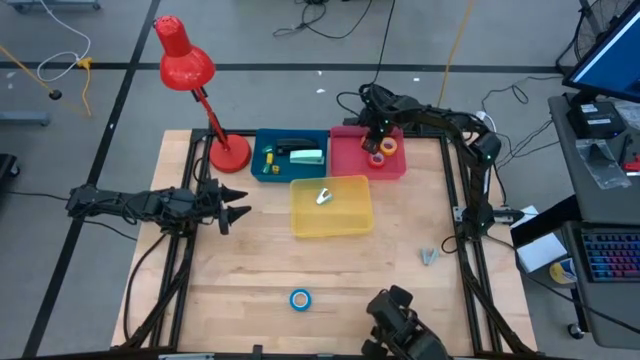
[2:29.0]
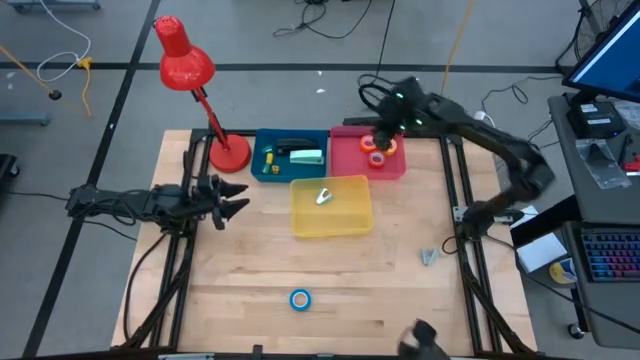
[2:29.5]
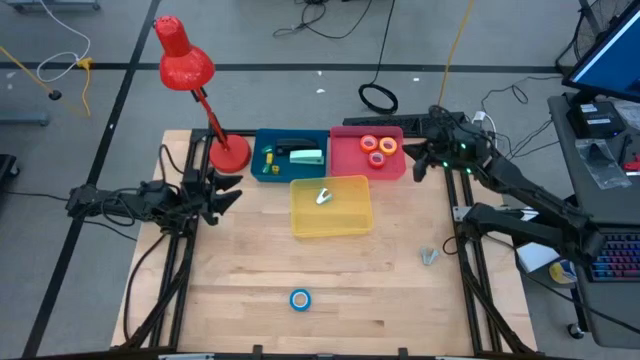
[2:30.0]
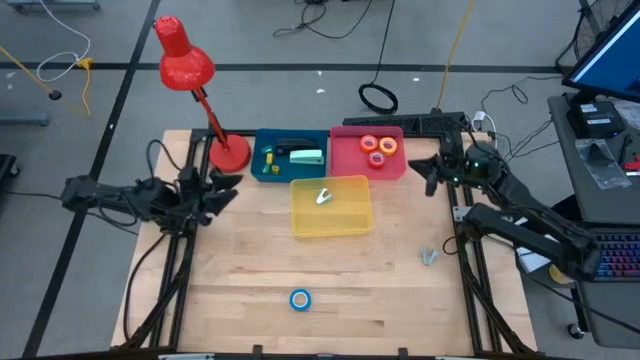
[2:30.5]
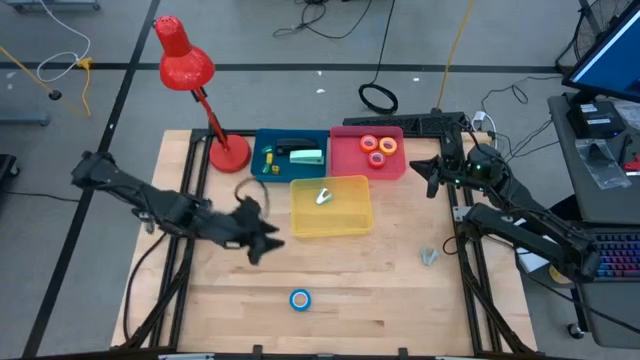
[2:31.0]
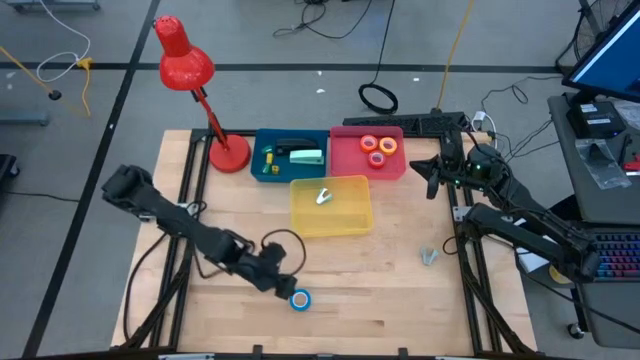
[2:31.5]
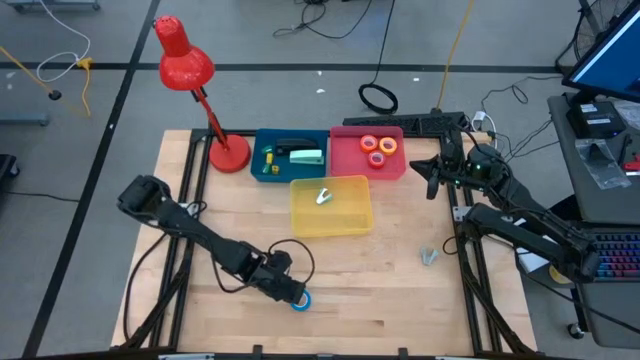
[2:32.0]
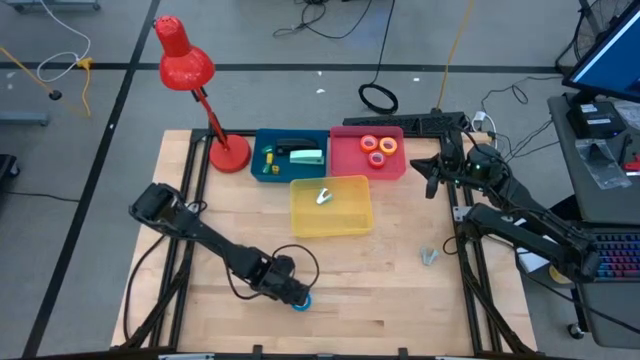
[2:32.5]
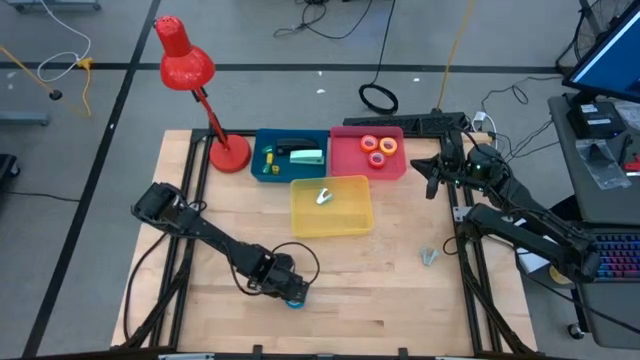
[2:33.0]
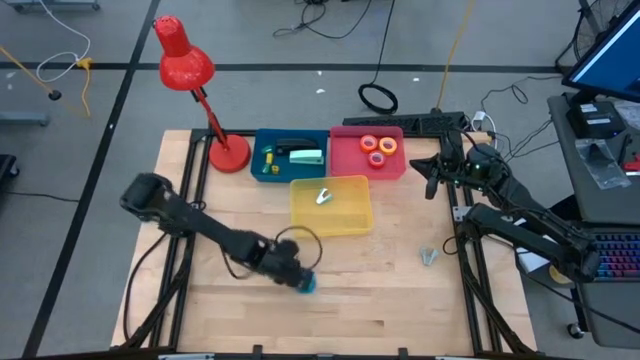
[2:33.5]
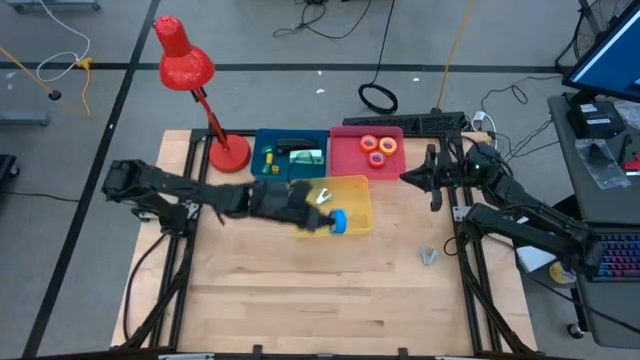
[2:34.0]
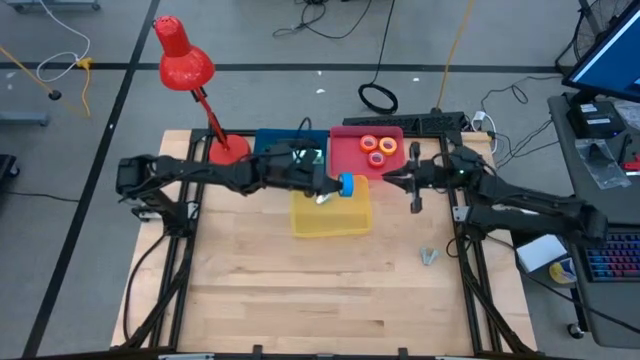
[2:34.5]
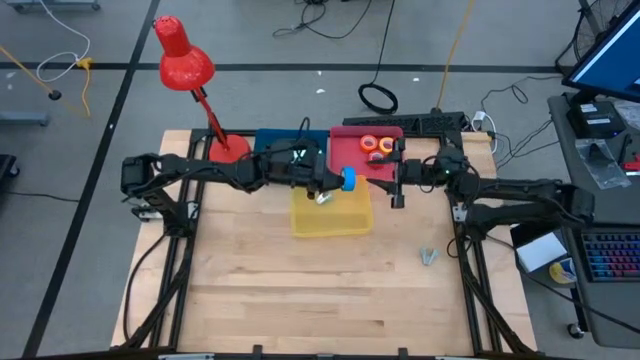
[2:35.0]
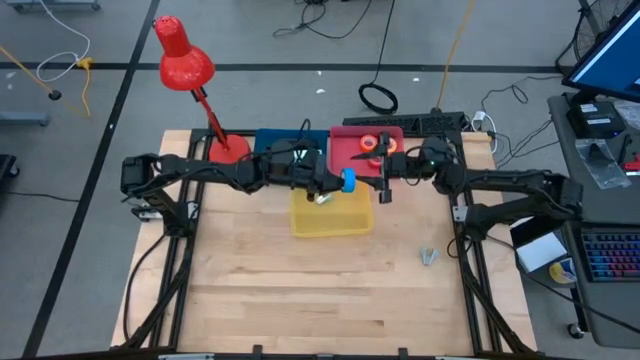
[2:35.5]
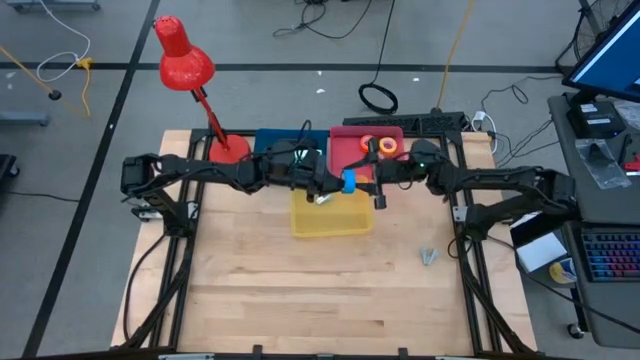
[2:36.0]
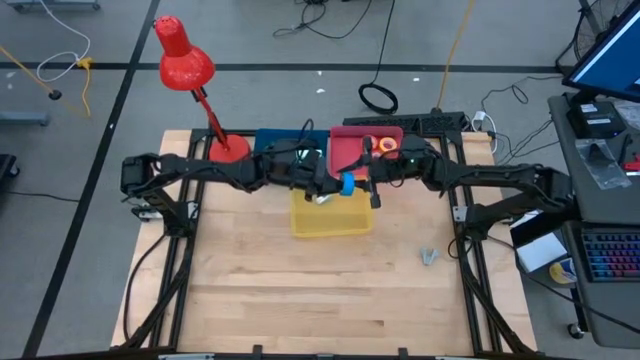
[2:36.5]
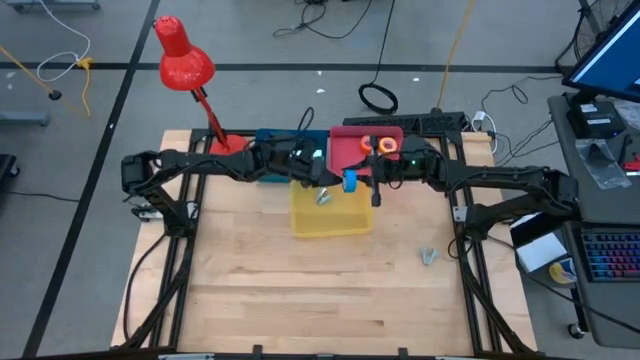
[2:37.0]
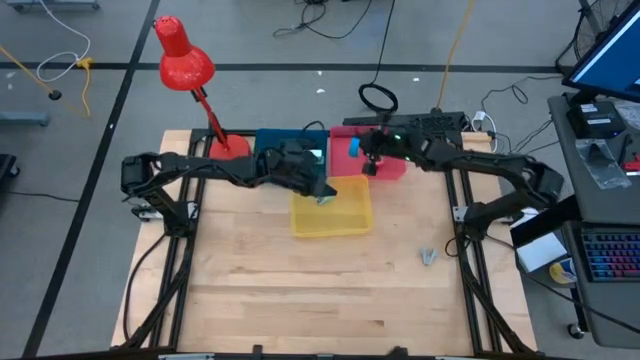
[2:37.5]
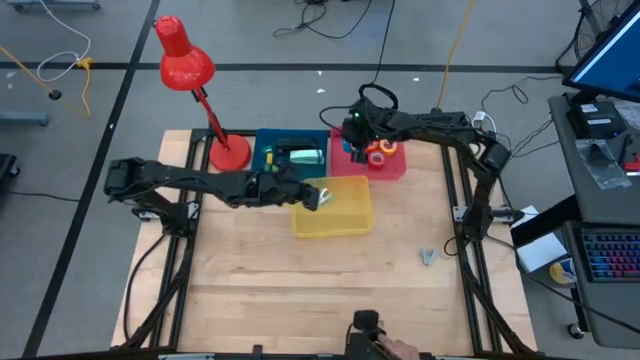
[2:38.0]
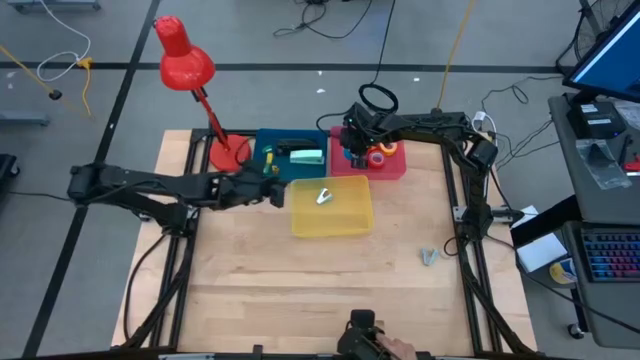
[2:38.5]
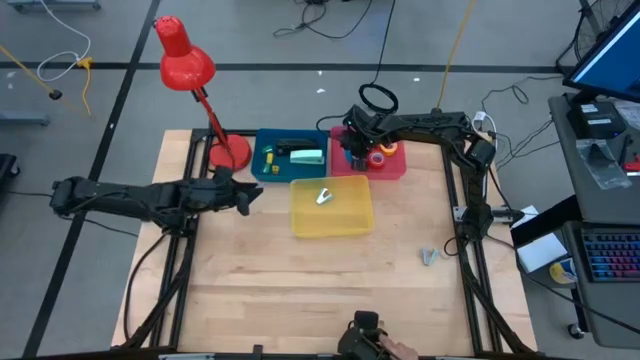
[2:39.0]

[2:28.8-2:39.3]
Task: Pick and place Stapler, Stapler remover, tape
Put the blue tape into the pink bin

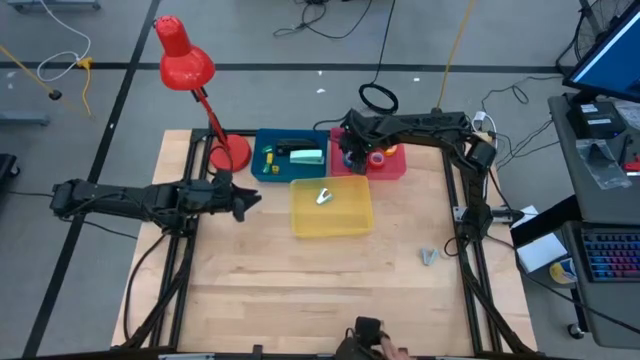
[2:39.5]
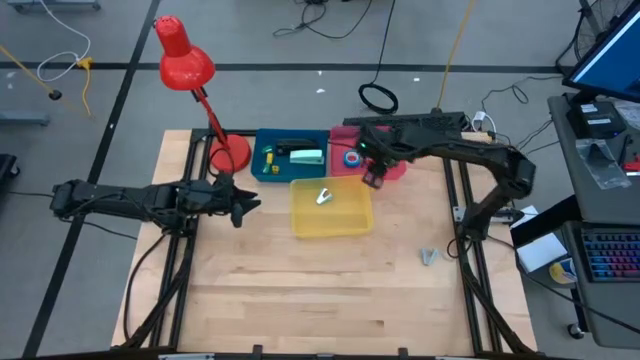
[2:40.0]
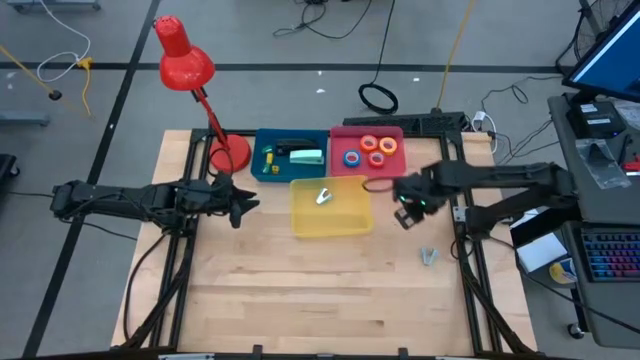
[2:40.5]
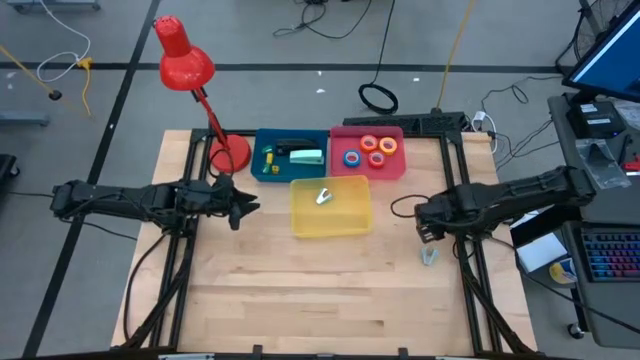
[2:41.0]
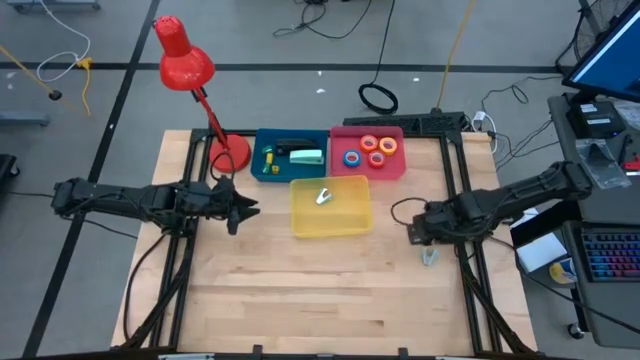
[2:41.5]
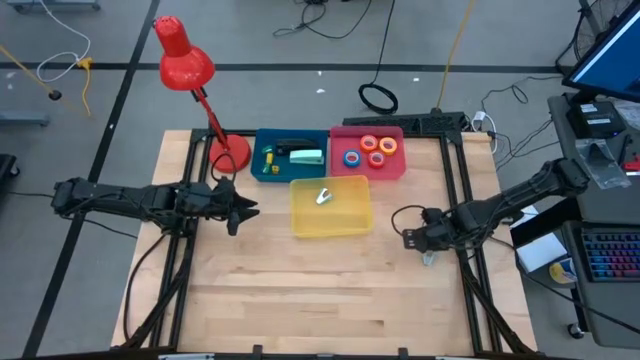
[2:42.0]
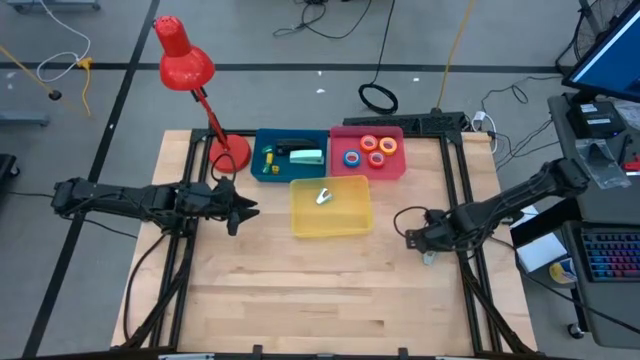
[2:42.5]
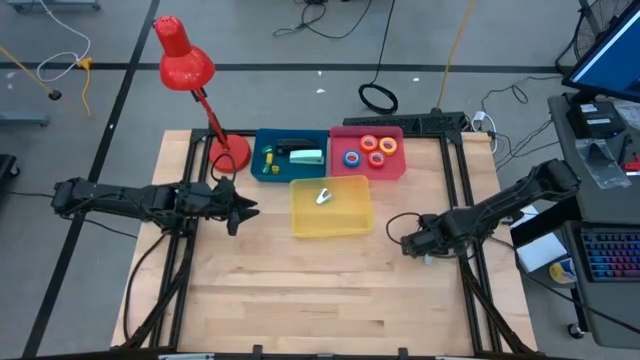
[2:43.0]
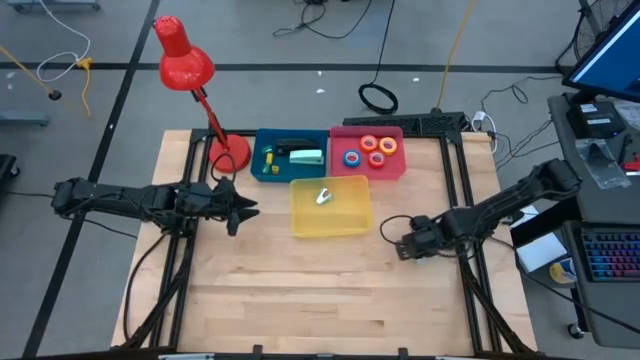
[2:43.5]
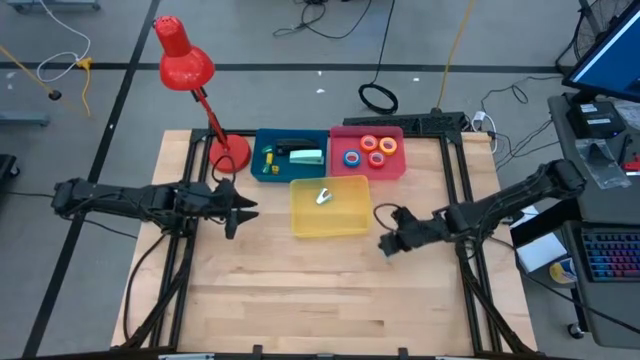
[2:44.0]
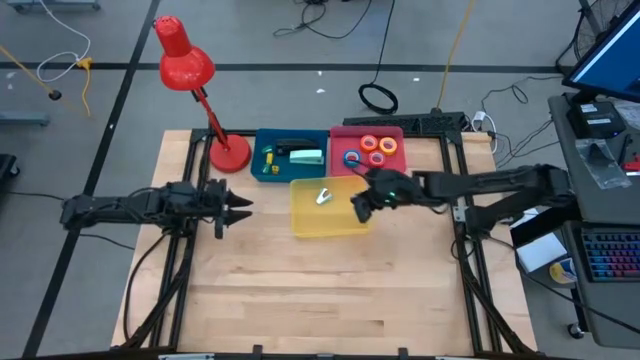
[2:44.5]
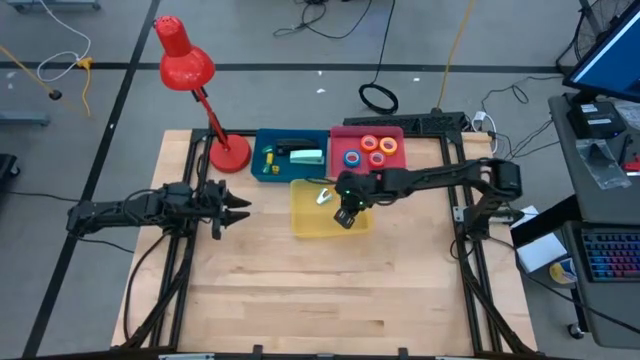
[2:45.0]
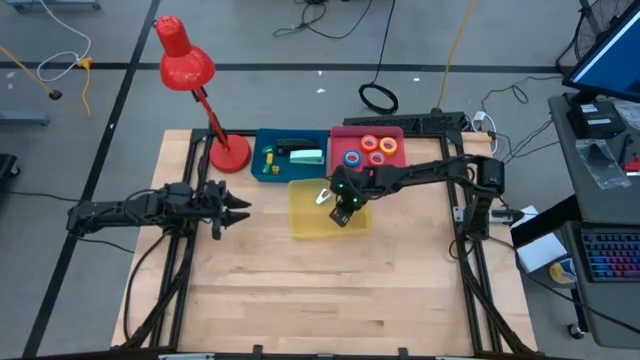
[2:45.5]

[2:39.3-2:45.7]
Put the blue staple remover into the yellow bin

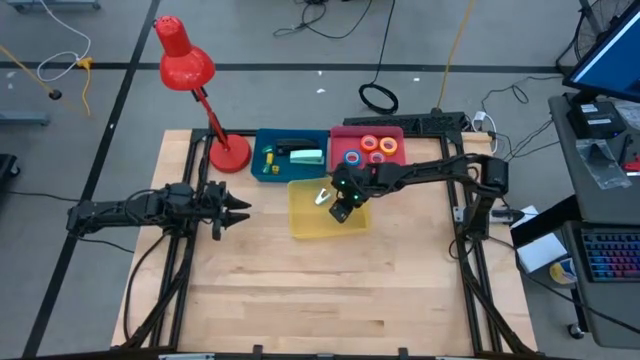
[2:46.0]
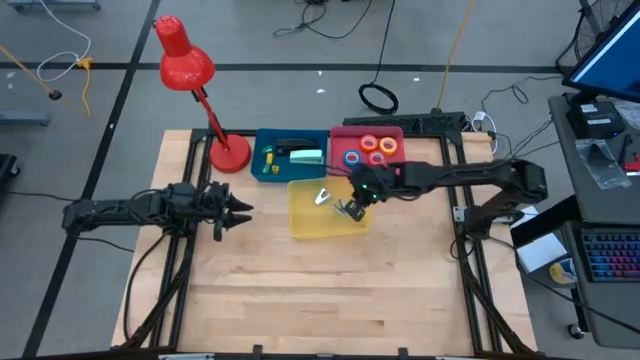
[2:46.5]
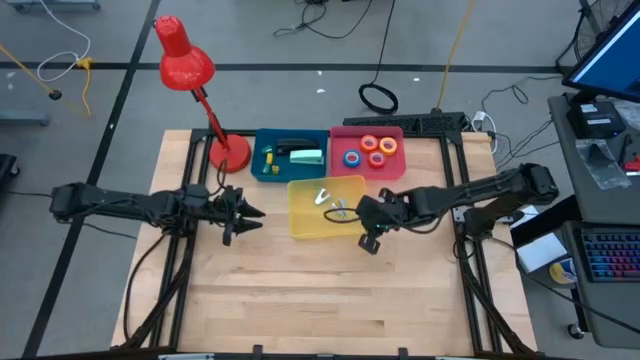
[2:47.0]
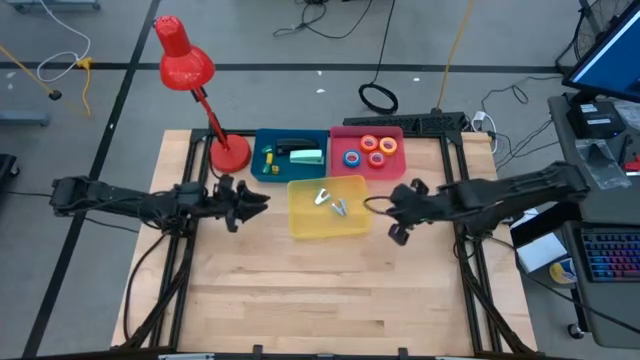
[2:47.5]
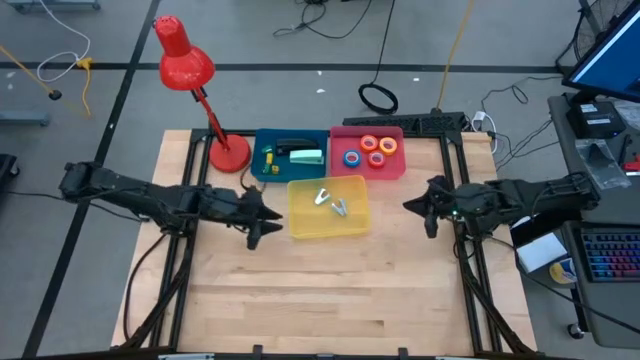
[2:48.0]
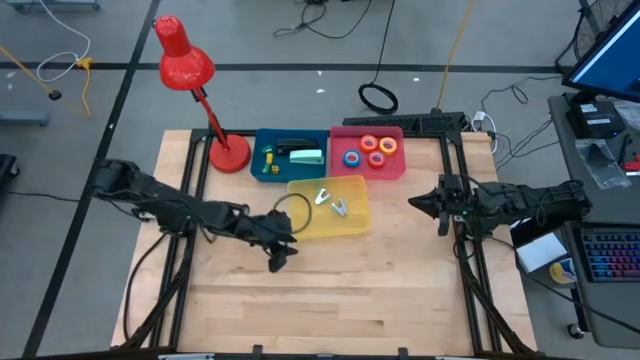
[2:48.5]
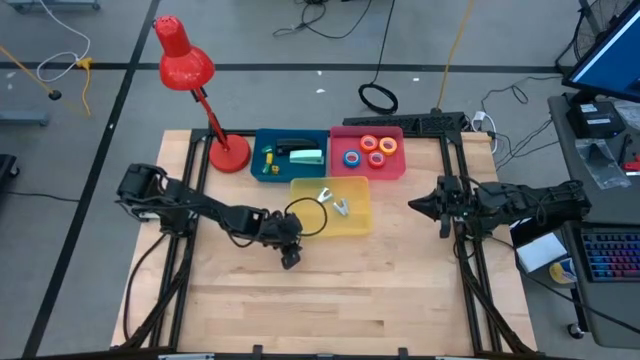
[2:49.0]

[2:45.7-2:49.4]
Adjust the yellow bin

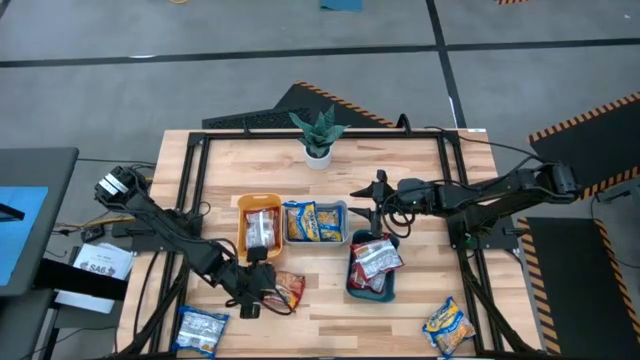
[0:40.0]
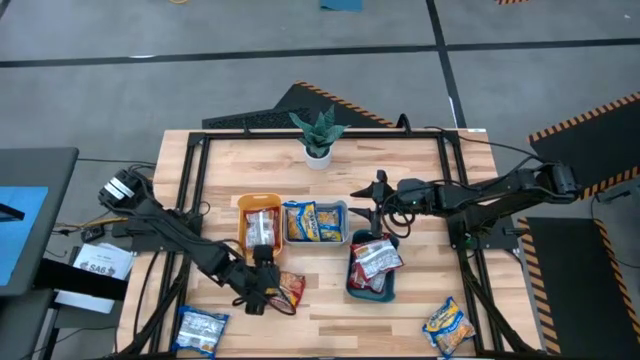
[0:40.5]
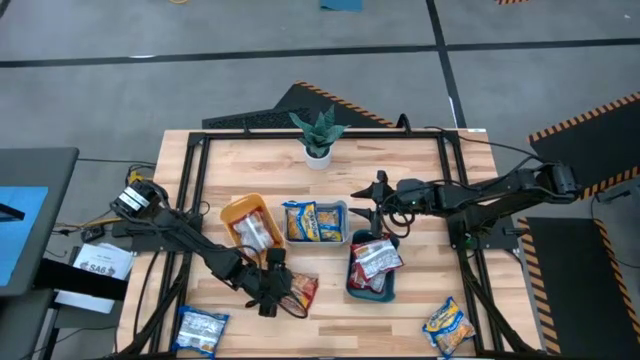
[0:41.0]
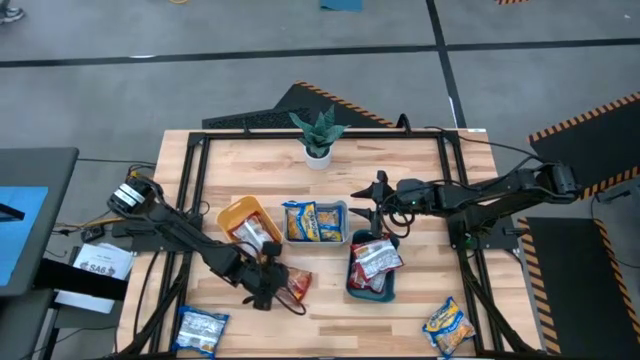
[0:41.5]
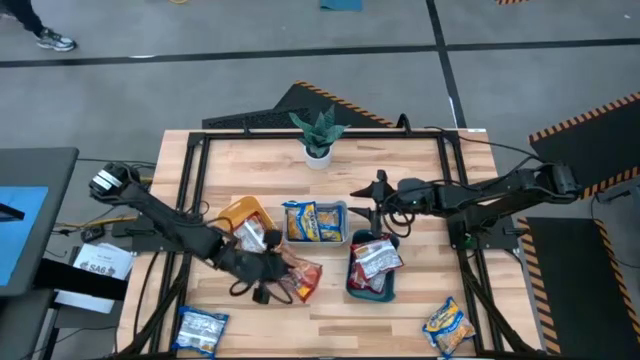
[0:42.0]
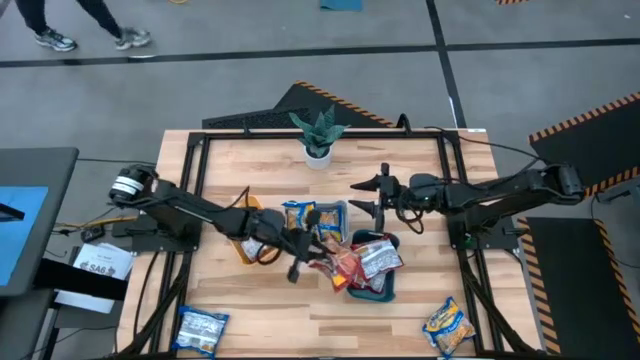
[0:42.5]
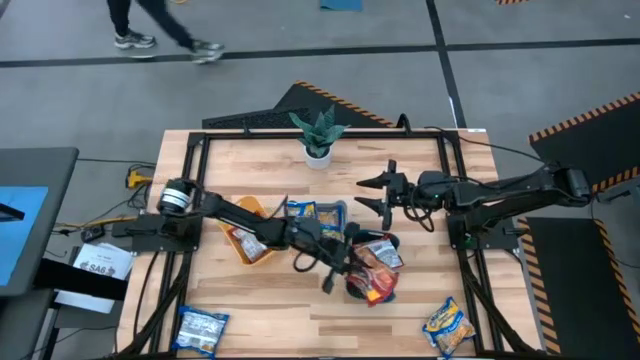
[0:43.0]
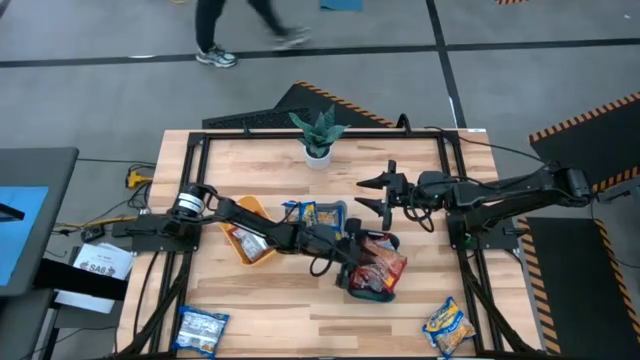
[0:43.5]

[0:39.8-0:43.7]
Task: Sort Maruchan noodles
Put the red noodle pack into the blue bin
